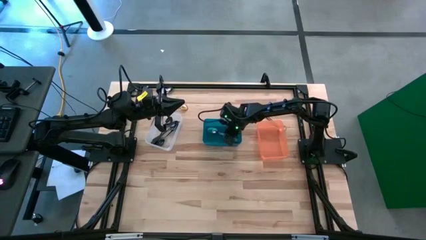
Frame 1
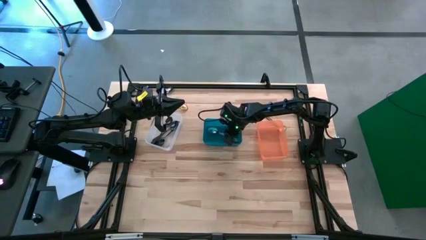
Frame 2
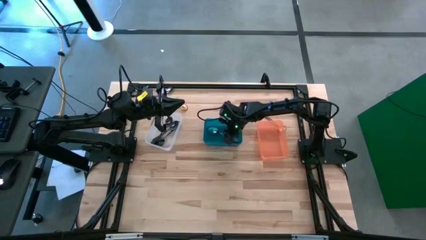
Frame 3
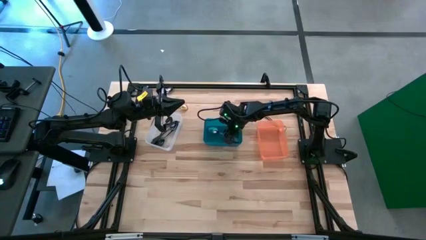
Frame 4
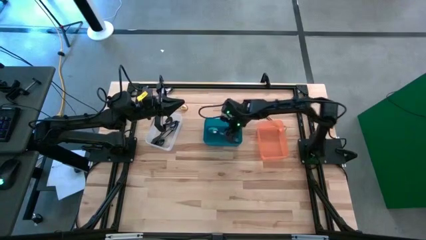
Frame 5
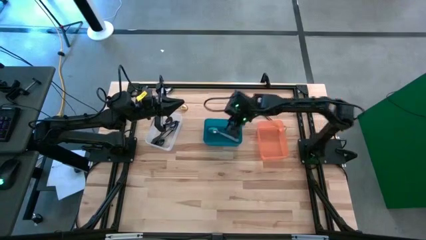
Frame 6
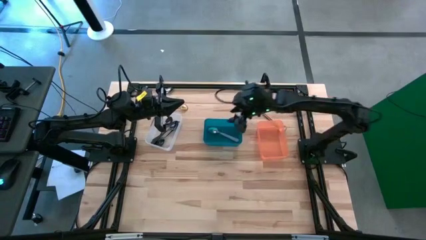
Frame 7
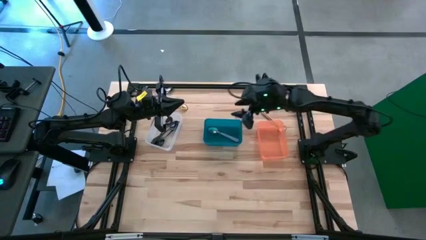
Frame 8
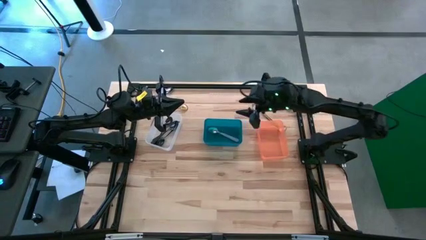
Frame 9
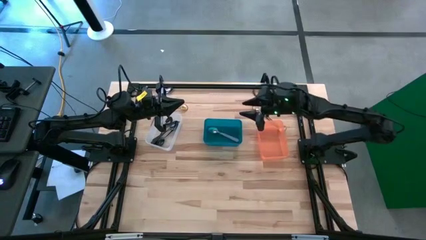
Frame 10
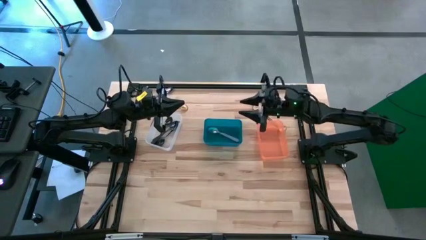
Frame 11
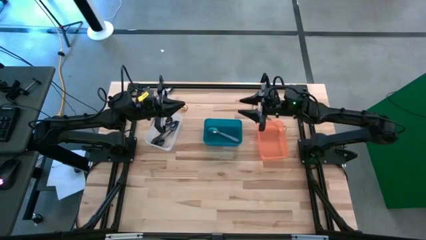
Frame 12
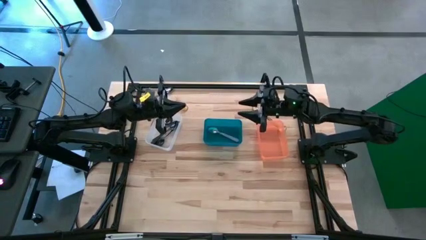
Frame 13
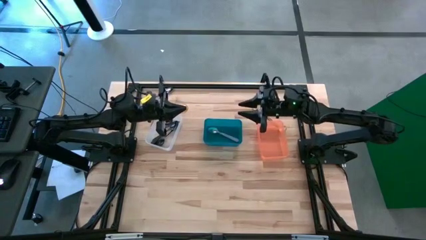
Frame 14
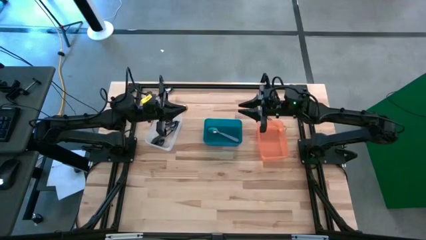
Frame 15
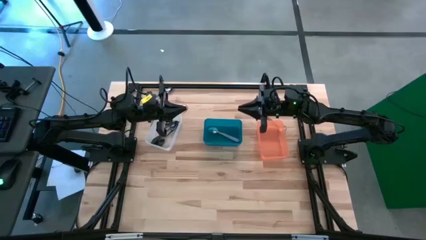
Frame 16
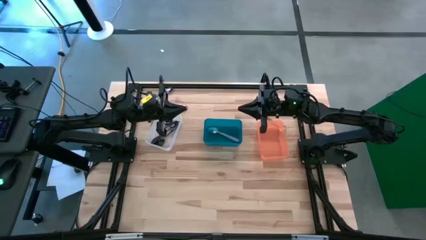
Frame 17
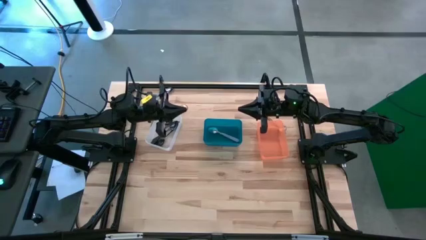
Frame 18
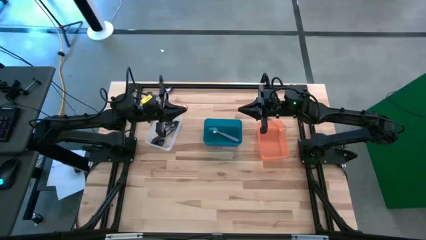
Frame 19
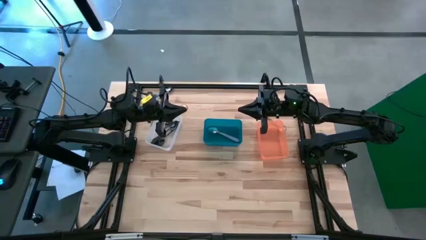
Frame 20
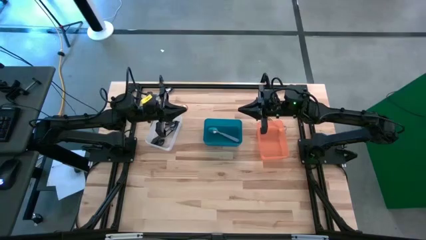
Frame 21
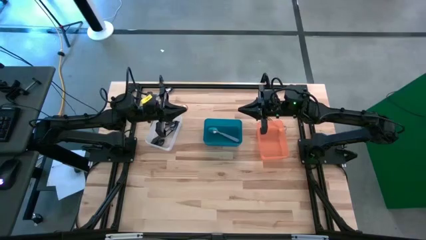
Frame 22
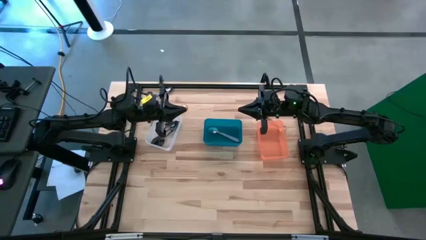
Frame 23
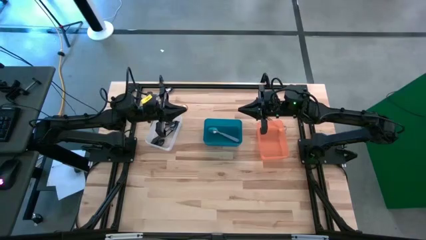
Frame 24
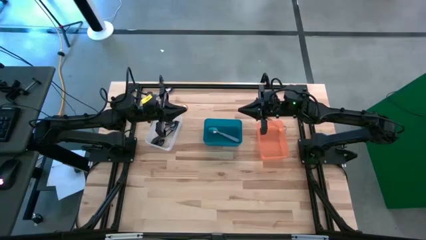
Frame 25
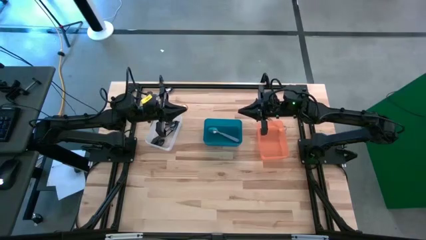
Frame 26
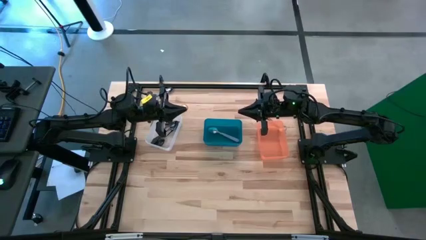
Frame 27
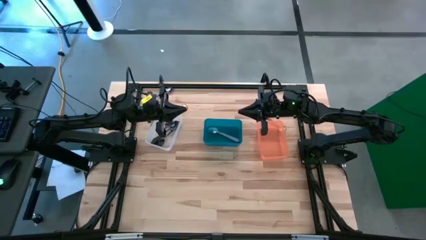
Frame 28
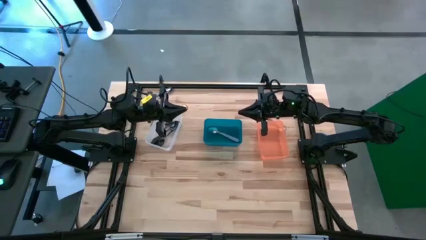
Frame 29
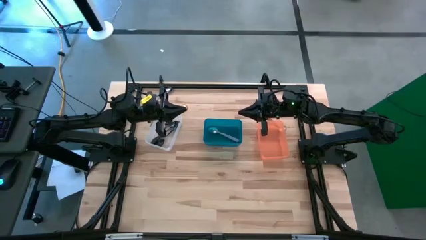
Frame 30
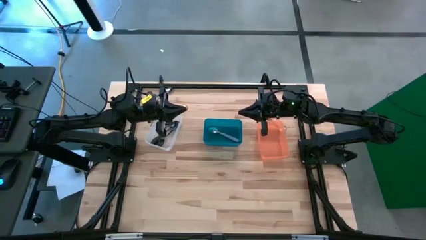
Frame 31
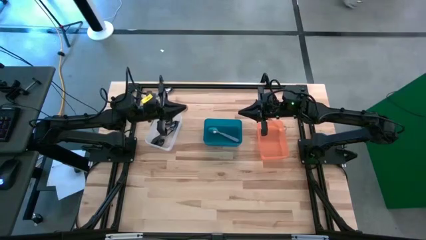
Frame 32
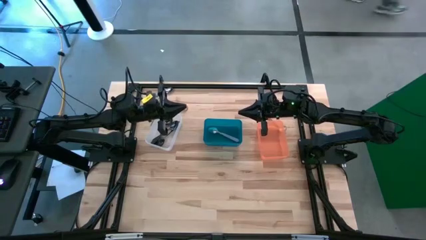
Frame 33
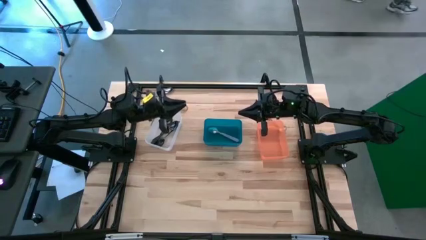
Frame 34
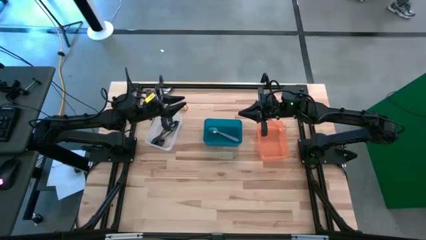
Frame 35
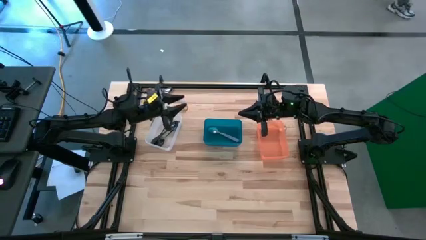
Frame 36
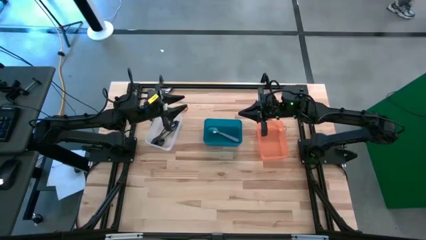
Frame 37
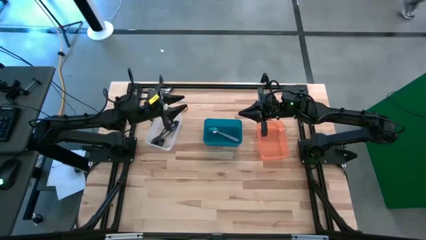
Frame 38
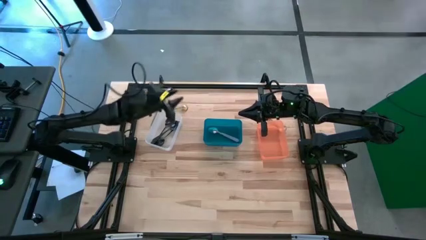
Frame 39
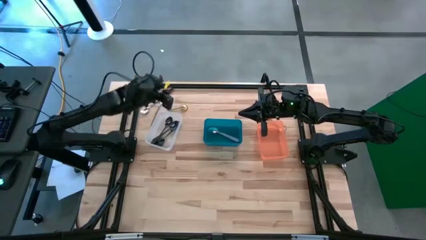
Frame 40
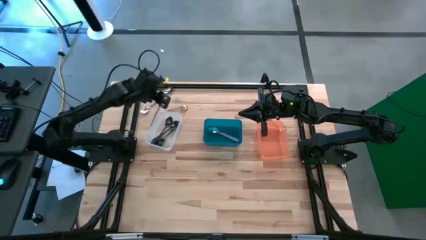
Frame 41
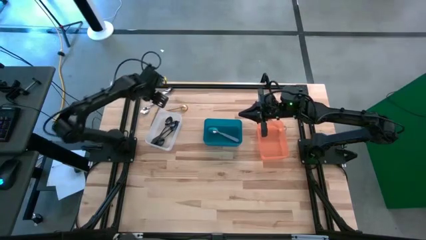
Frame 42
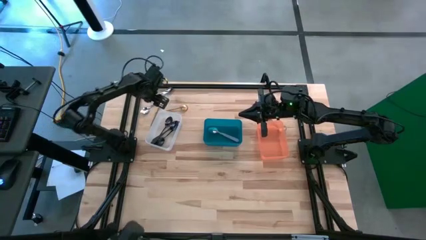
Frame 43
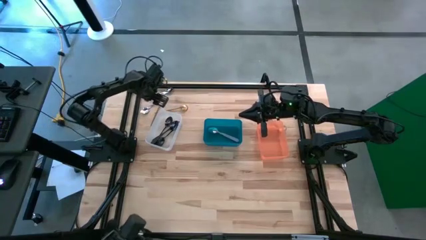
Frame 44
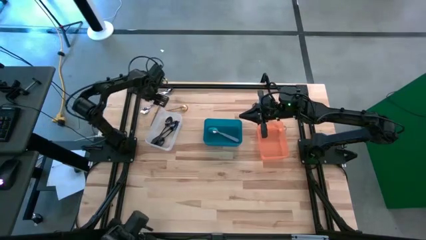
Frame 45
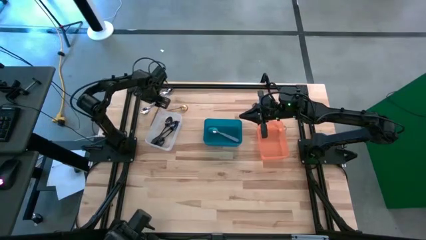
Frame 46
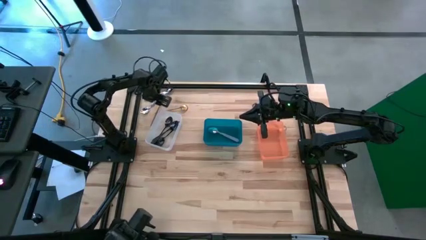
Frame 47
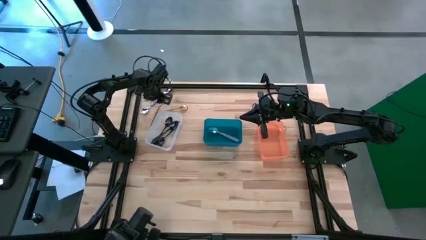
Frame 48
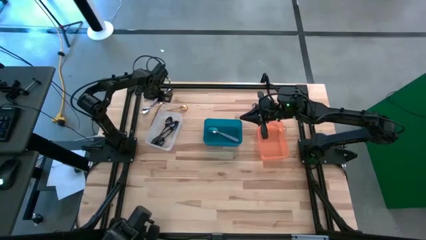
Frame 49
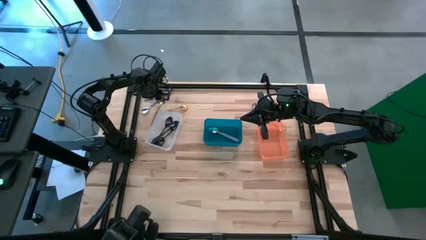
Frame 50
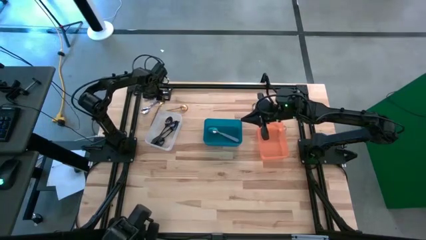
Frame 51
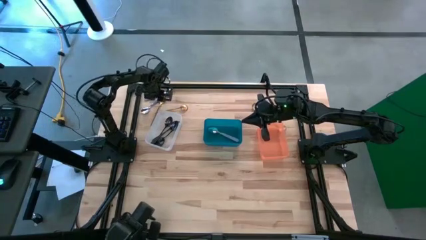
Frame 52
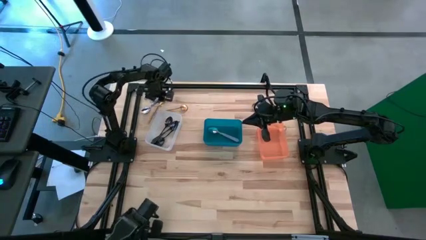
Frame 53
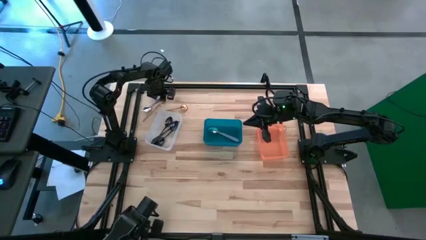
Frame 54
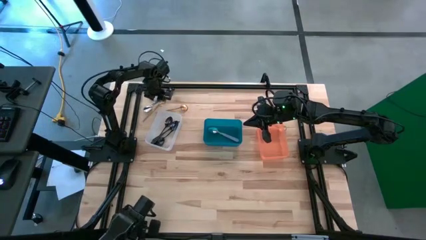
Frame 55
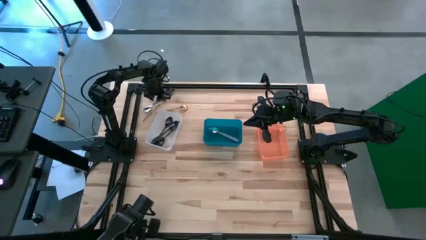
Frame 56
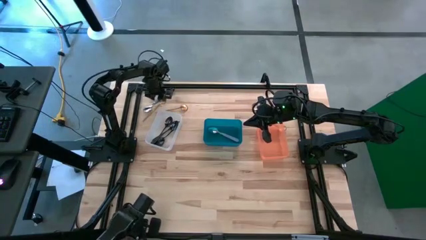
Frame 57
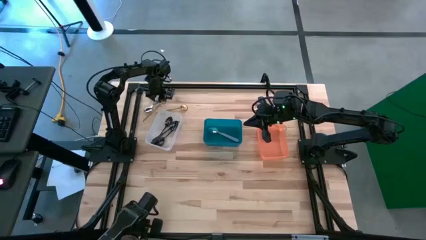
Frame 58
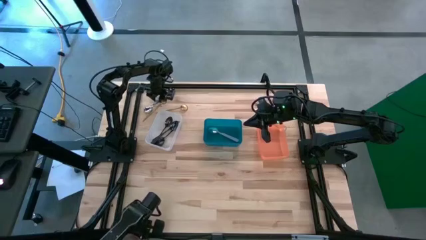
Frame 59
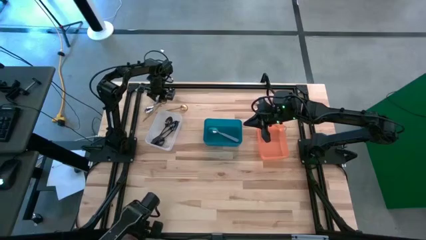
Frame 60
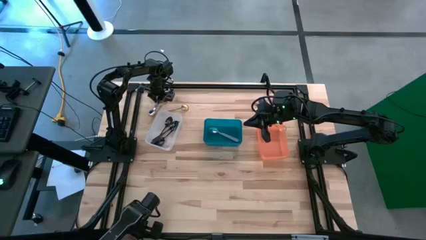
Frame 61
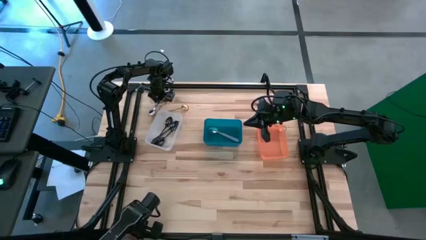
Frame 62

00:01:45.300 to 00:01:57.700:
Task: Sort silverware by color (type)
Put the purple spoon into the blue bin
